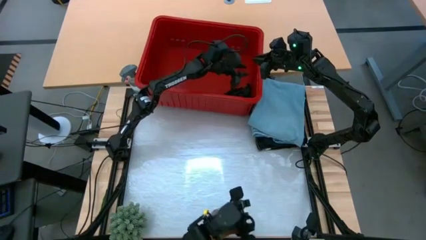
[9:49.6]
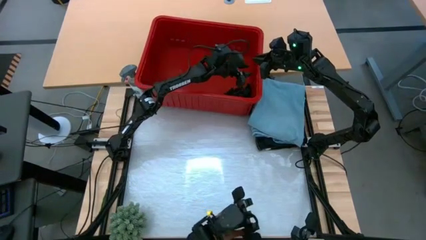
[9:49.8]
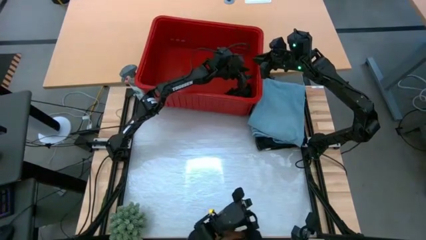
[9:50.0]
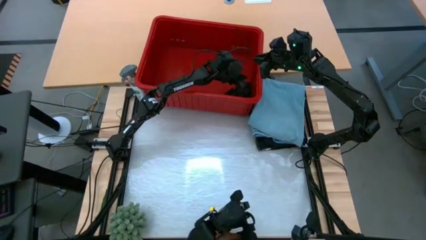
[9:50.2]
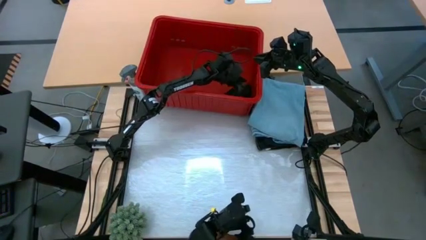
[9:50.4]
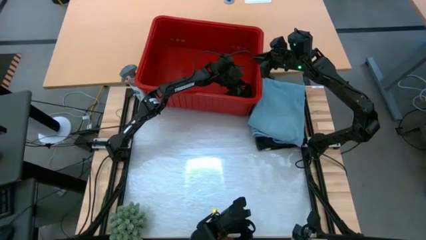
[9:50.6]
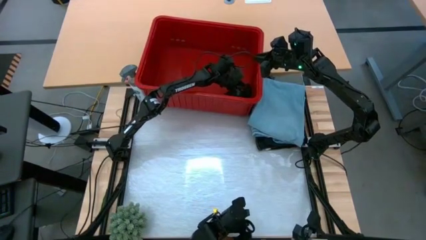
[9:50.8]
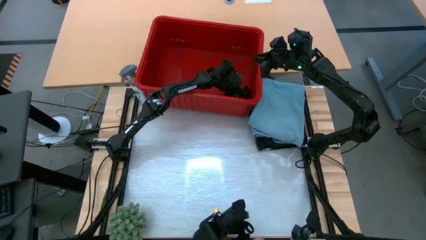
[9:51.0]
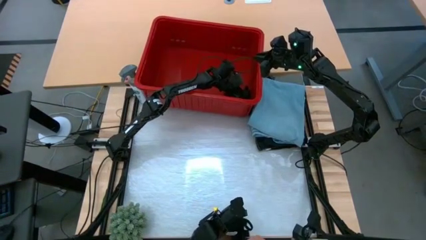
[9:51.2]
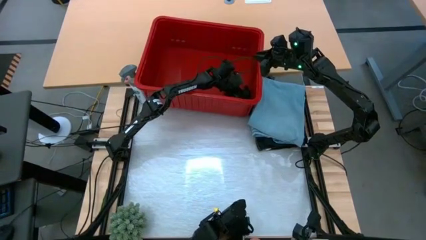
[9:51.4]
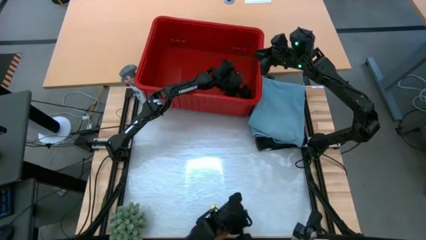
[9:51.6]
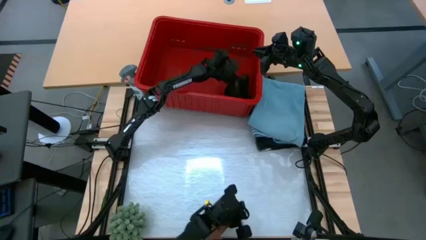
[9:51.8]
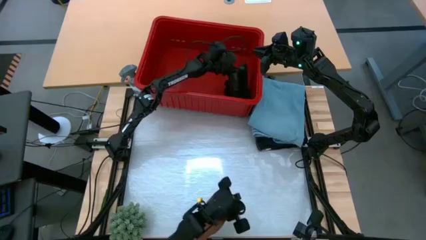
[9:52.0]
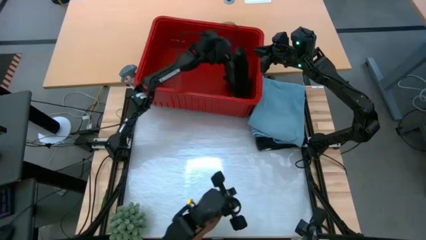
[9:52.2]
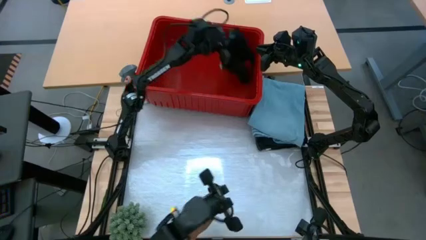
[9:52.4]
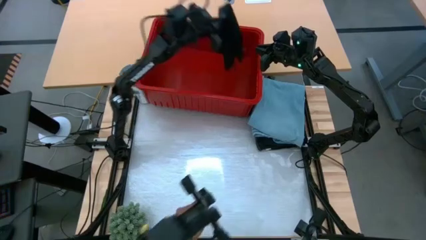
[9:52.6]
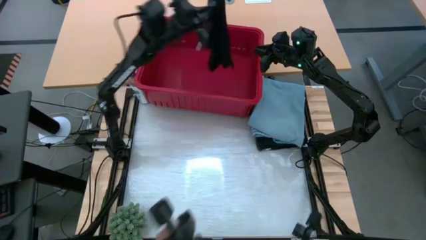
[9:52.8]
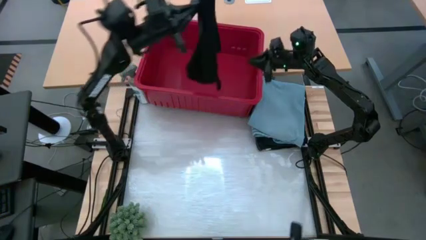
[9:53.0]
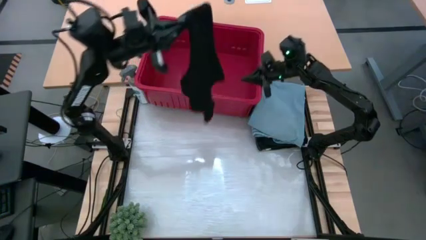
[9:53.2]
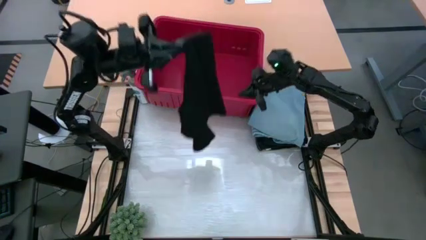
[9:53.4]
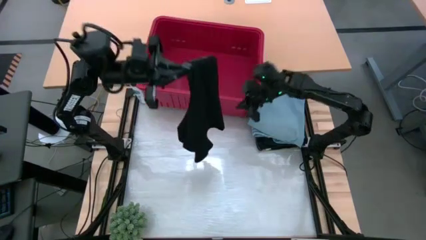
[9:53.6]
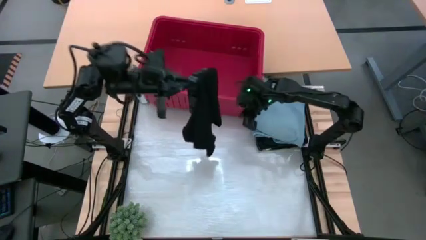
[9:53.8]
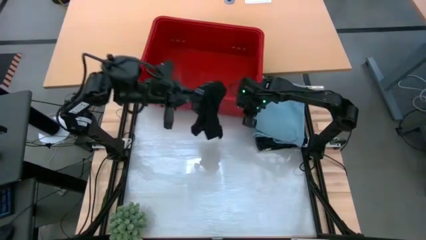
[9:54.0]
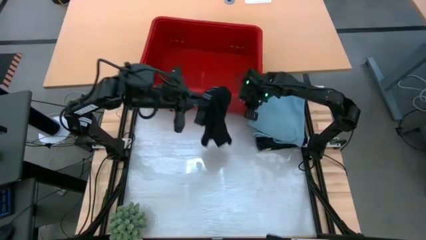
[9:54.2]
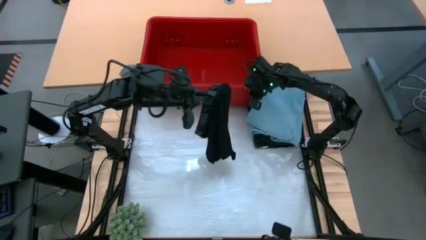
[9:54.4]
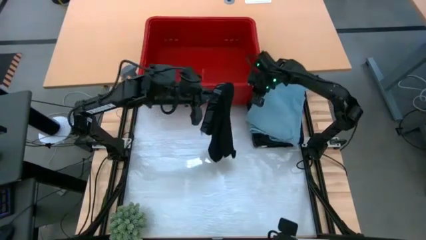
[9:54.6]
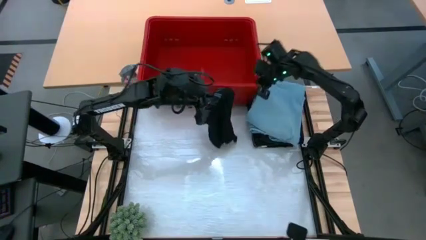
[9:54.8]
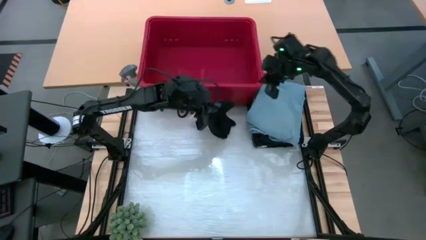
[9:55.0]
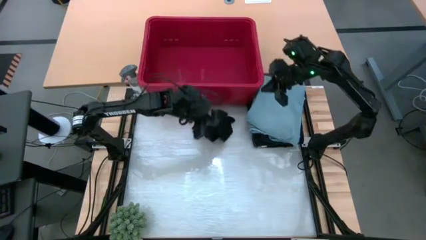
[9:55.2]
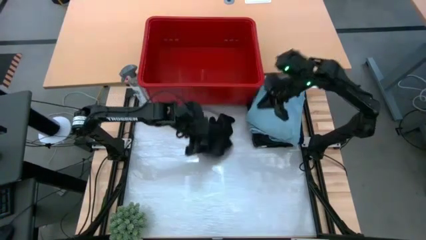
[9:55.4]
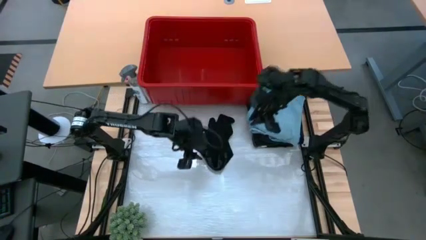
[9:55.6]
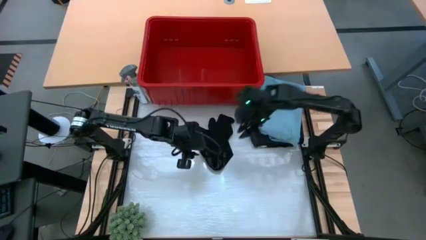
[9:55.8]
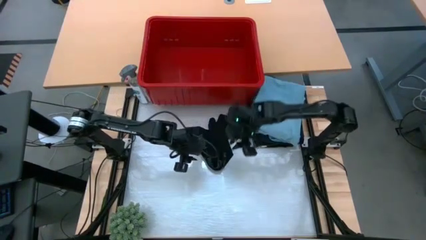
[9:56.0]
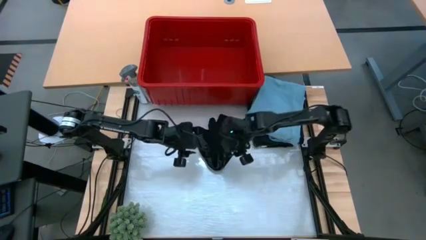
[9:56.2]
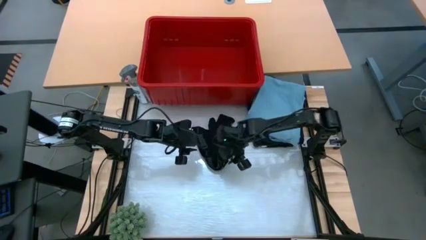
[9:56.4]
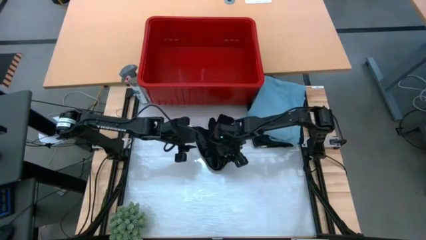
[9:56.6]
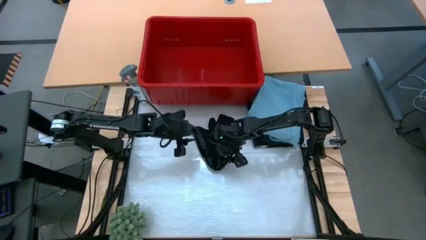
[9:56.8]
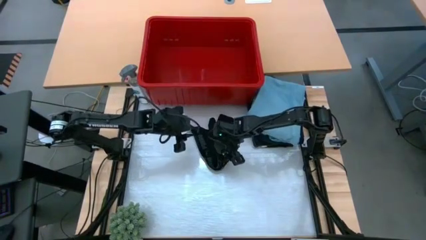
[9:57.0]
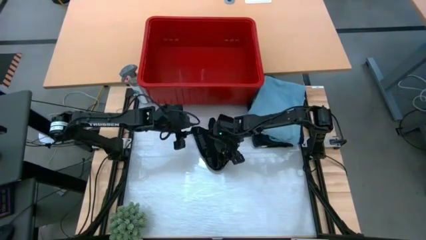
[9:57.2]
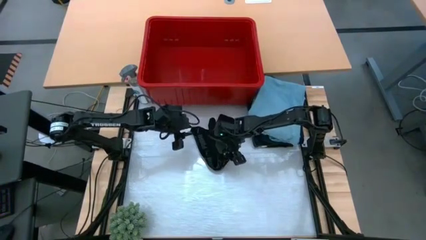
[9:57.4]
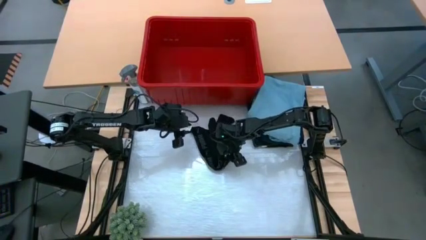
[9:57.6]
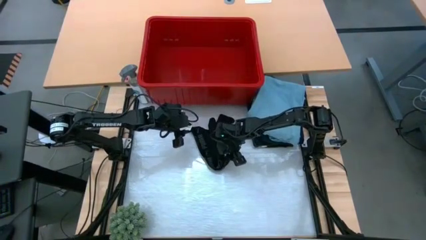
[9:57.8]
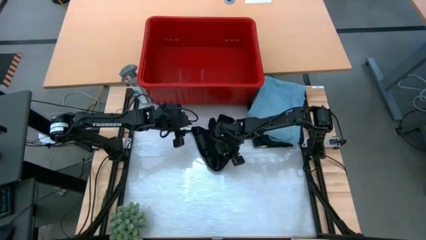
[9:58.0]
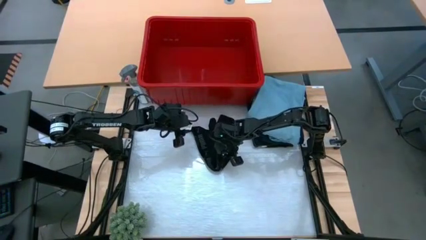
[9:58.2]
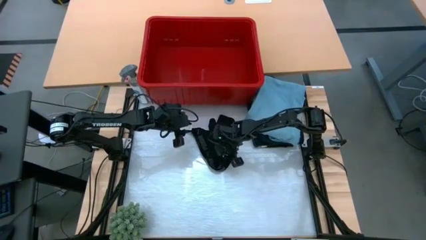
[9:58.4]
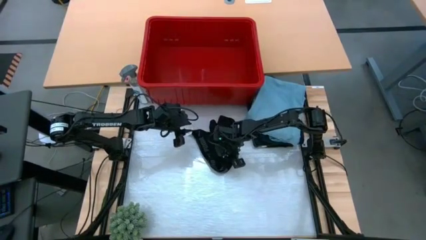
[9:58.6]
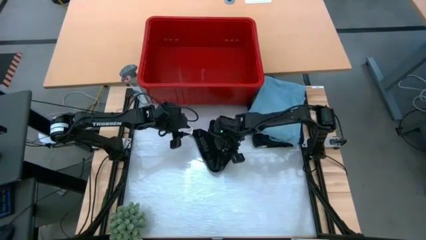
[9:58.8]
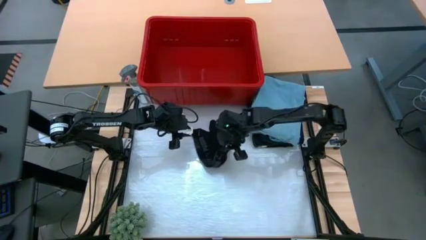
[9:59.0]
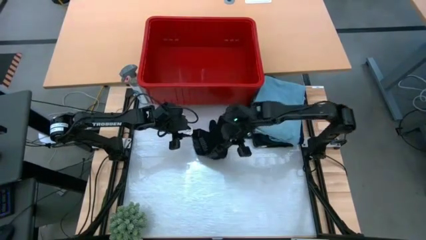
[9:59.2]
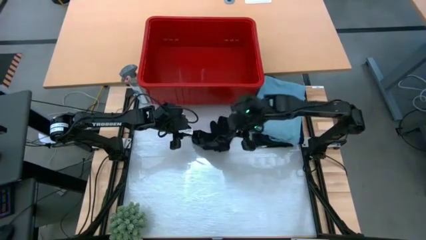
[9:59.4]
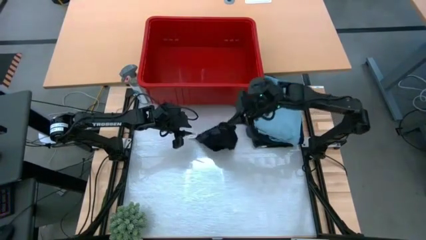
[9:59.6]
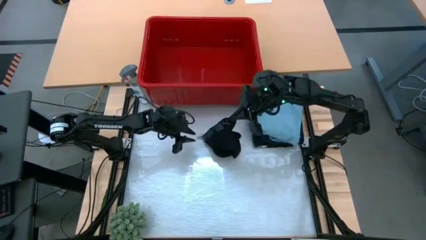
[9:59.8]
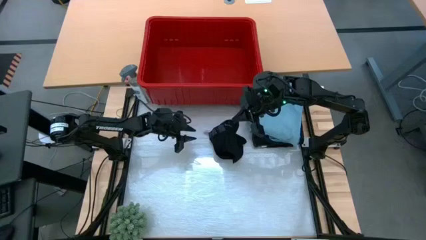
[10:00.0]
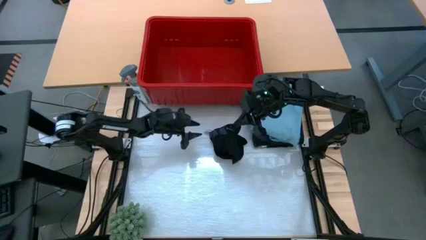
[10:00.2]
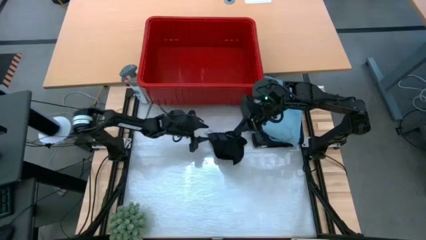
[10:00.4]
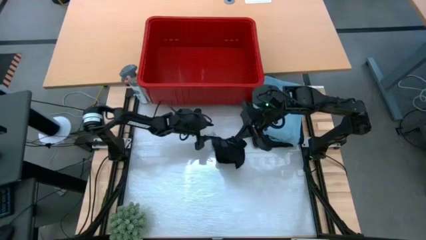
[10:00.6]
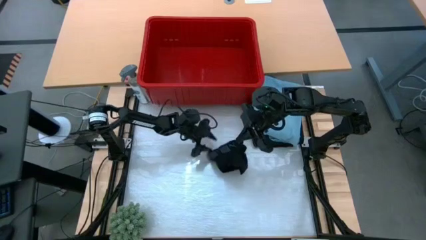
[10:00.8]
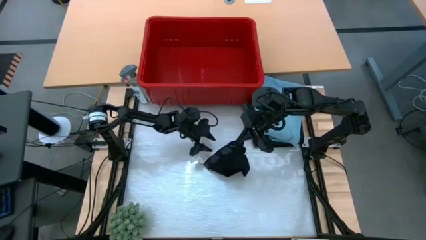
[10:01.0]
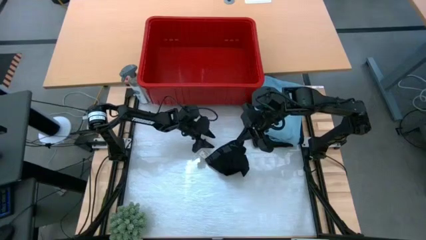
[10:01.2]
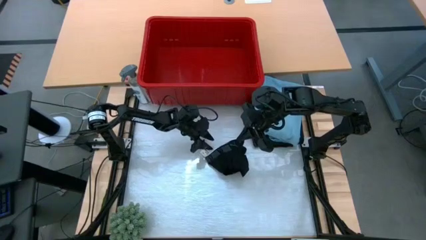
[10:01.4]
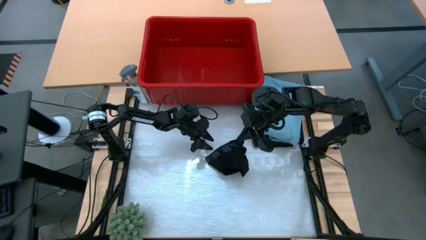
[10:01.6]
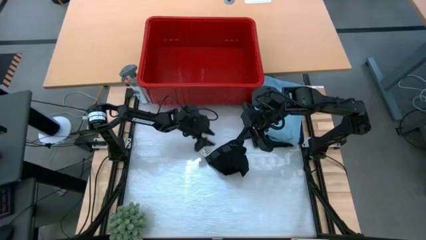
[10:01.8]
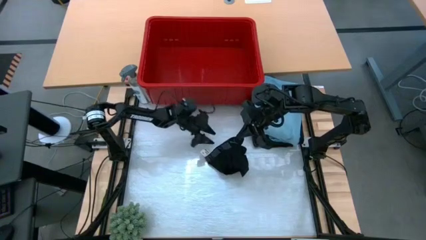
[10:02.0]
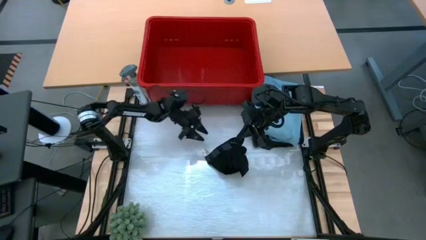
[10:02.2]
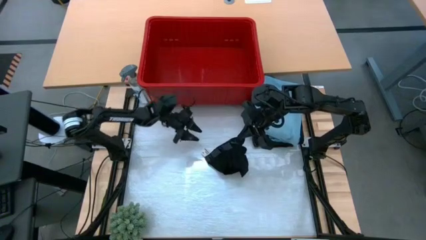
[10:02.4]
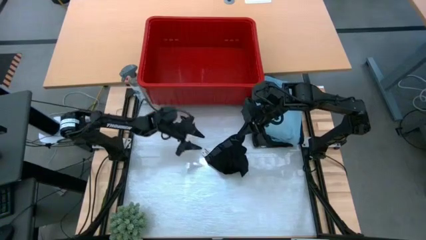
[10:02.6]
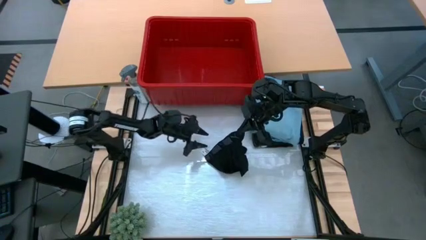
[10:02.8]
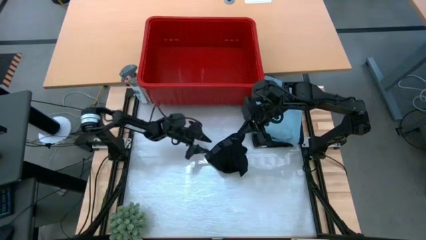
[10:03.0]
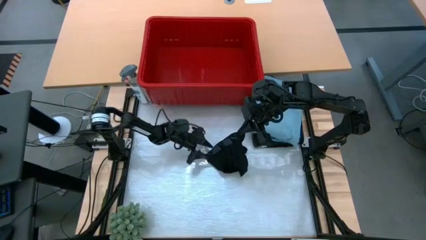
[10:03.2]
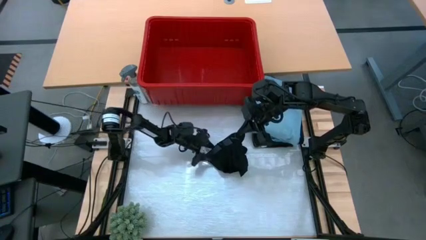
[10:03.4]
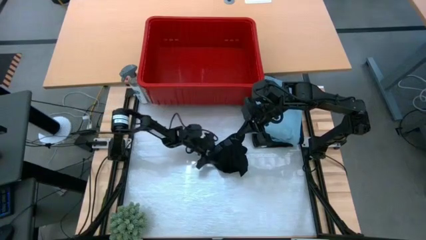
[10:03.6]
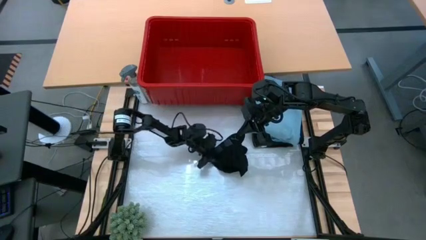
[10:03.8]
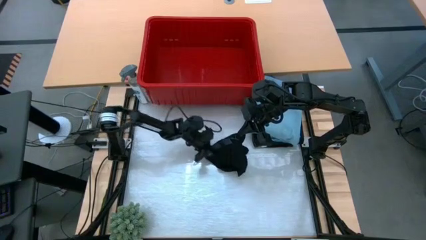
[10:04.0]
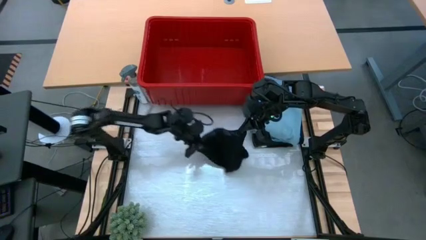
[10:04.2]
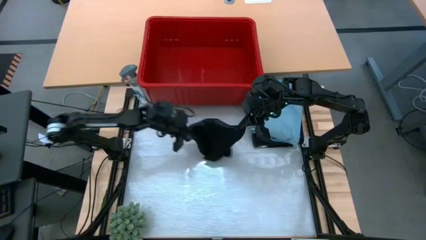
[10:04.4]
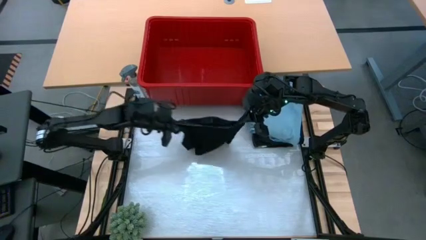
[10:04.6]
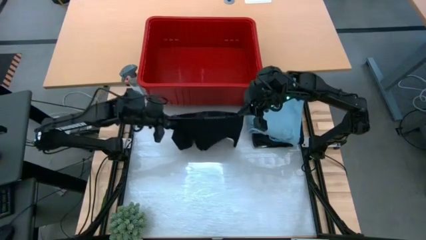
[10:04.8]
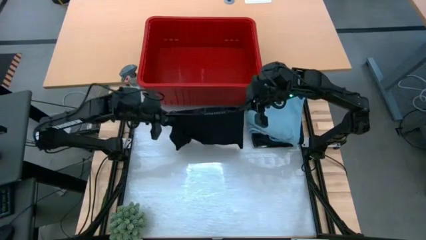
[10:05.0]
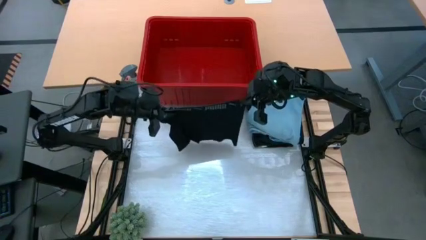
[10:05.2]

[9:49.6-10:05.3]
Task: Fold Laundry from Bin
Fold the black boxer short
